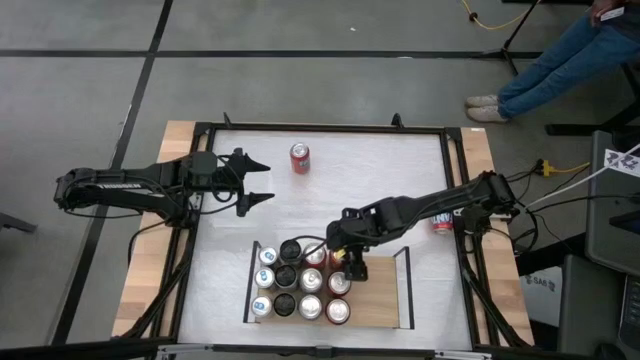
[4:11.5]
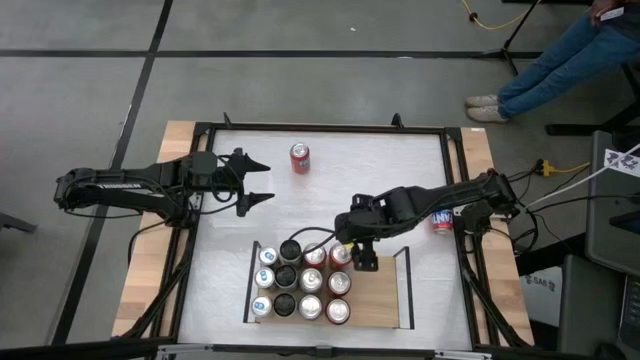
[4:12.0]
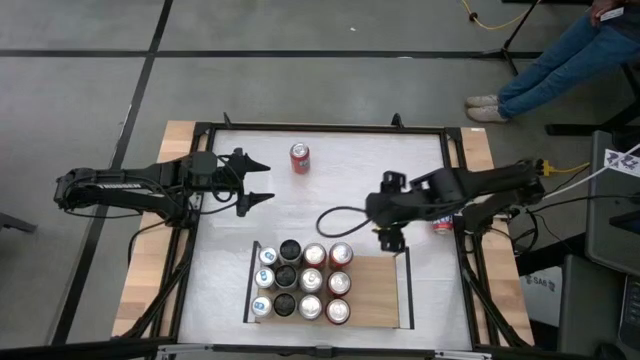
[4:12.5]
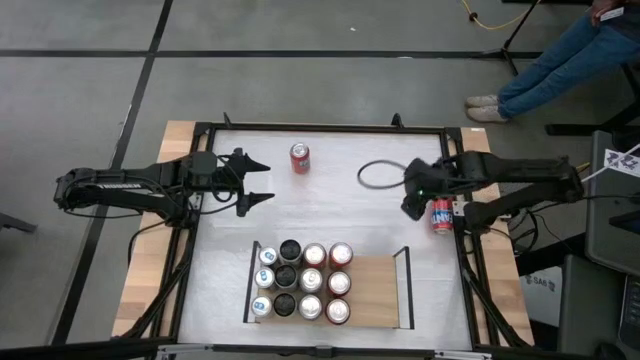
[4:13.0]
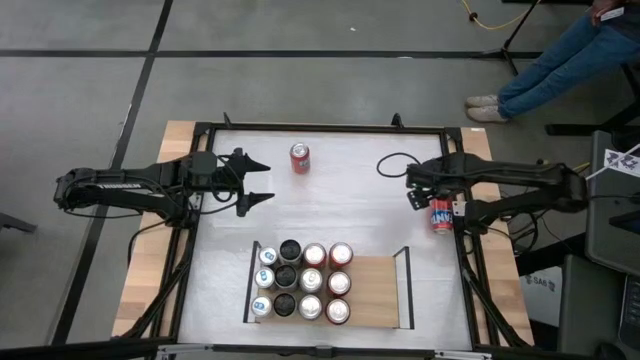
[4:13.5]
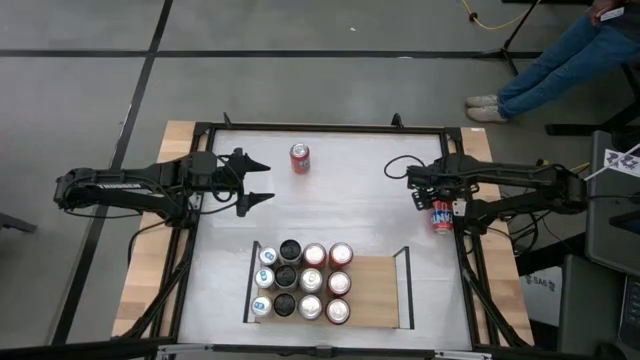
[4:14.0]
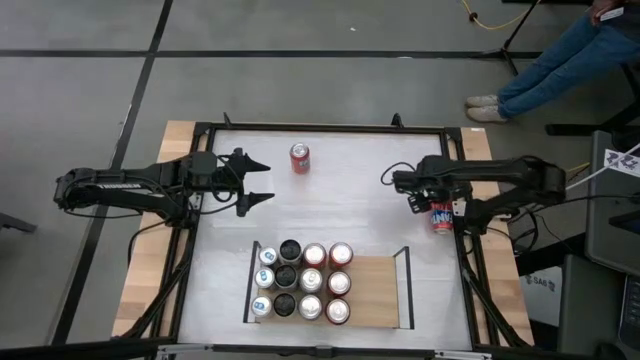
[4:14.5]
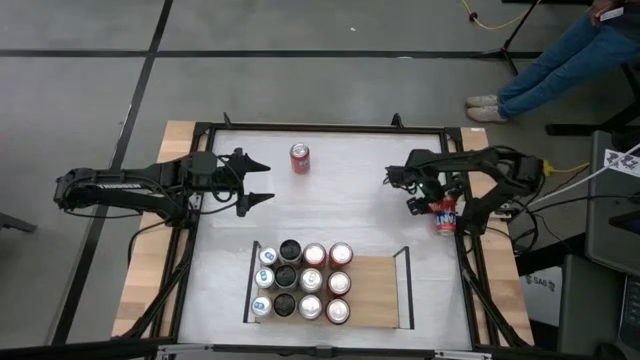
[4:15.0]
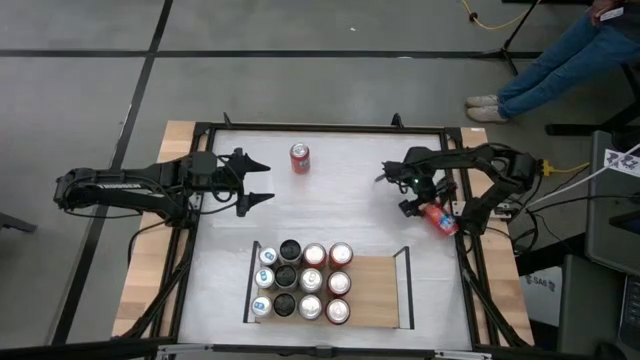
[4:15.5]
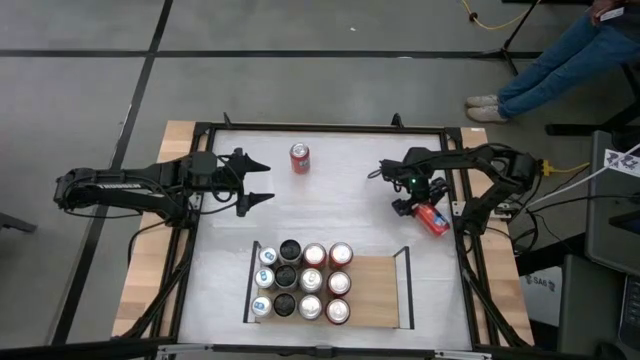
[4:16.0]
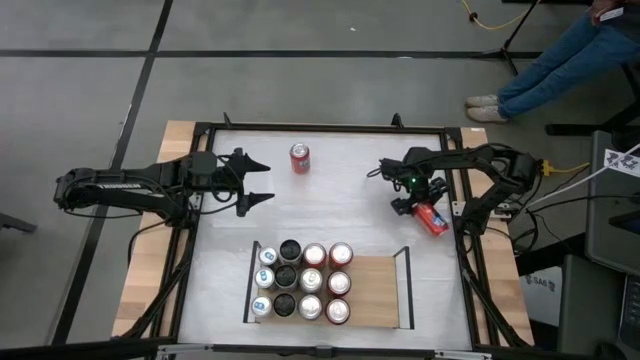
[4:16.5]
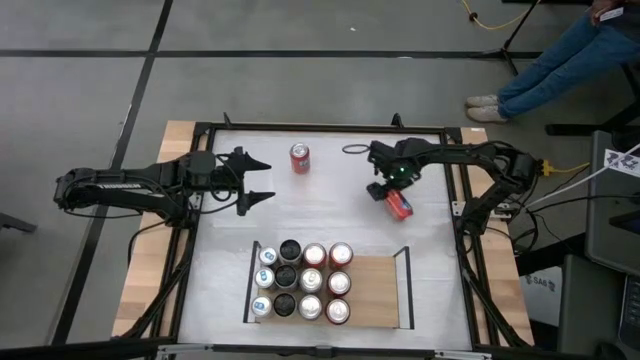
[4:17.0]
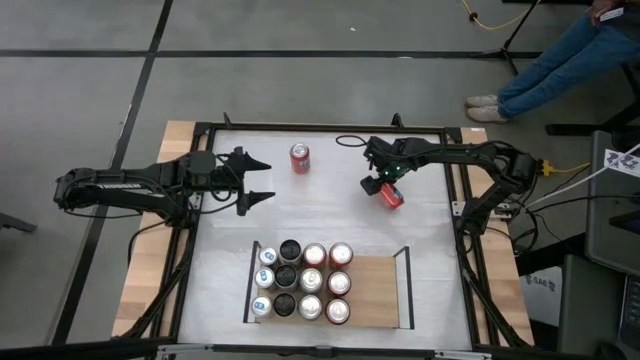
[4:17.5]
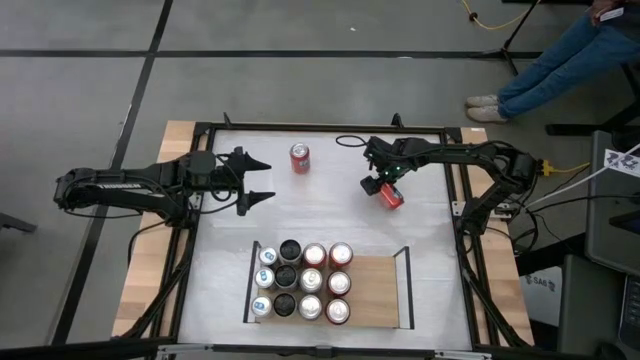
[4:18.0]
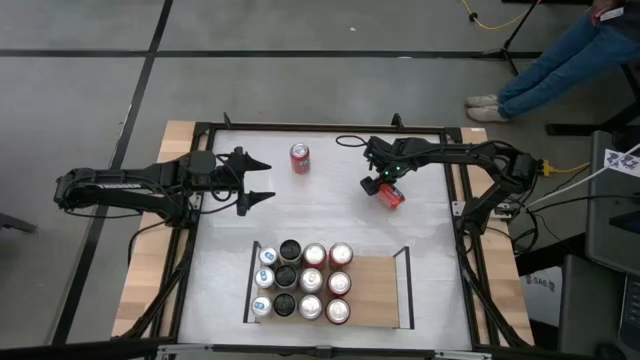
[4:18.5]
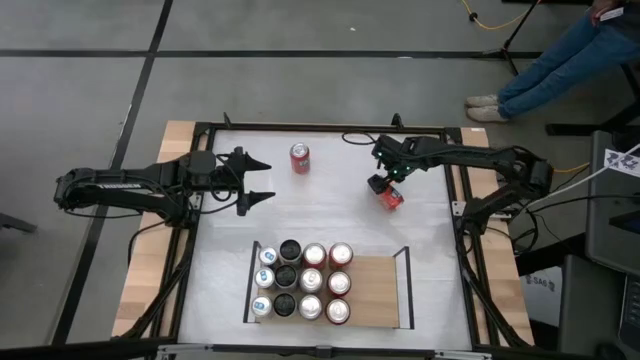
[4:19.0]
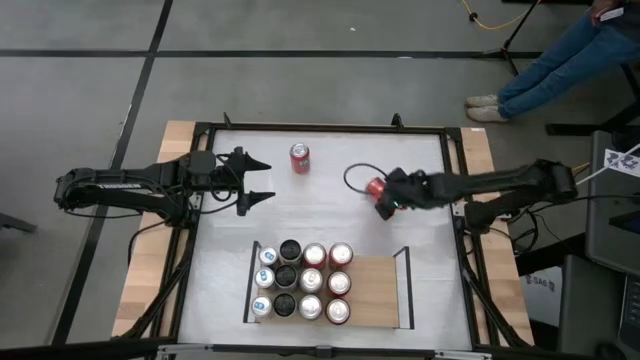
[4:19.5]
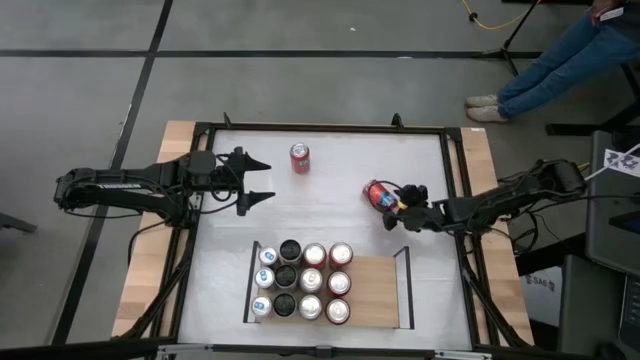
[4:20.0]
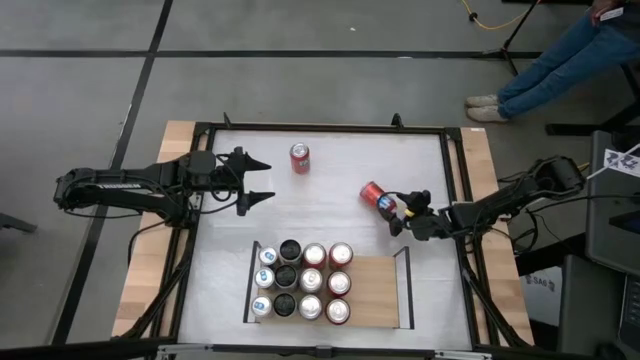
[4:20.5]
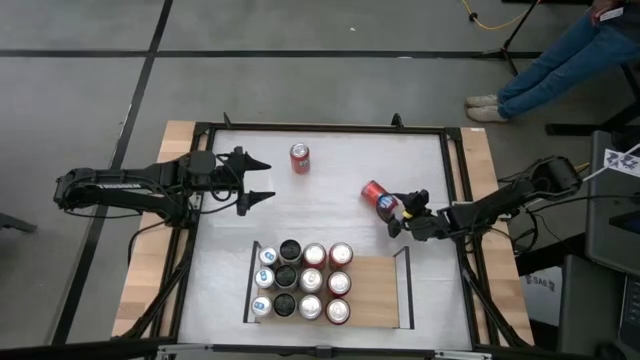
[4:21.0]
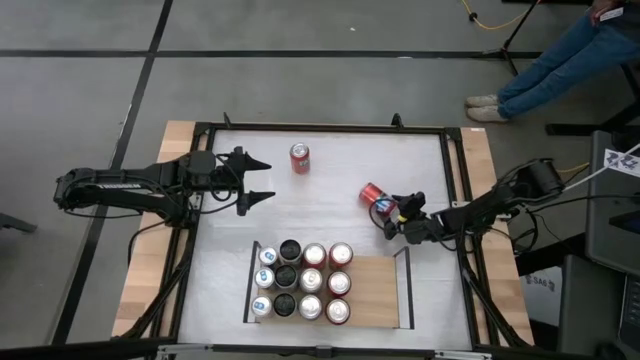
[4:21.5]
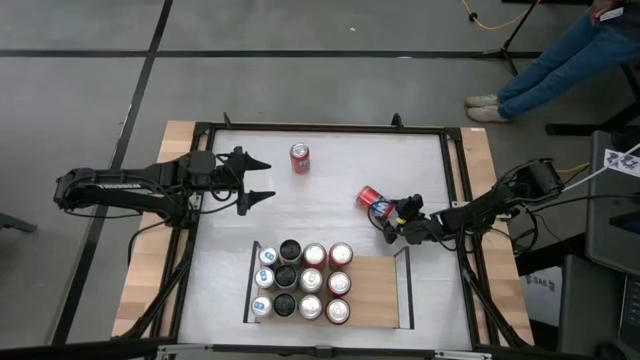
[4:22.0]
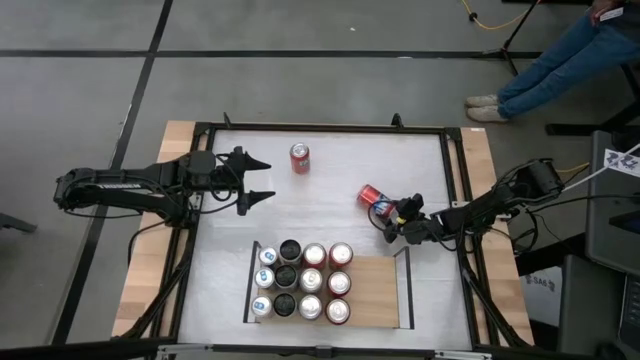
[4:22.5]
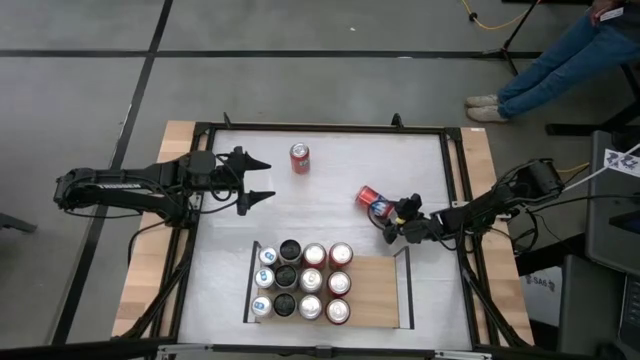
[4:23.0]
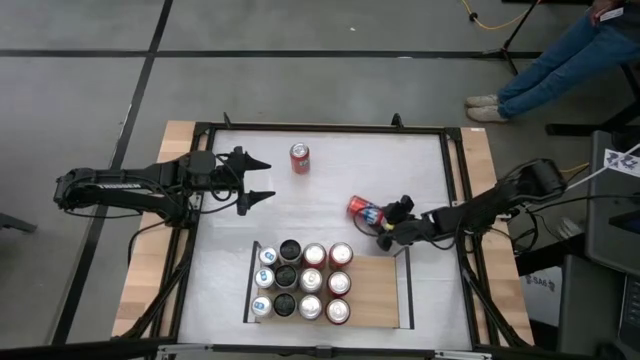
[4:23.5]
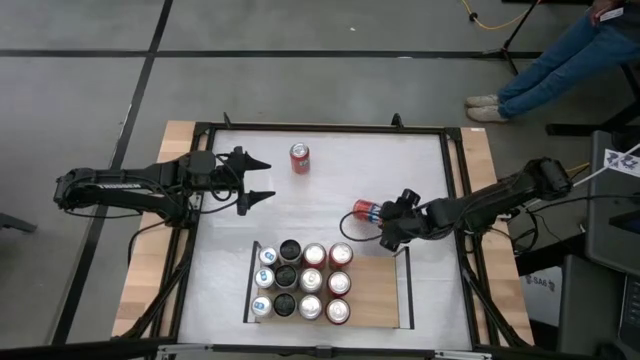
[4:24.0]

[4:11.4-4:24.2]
Task: Place canned beverage on shelf
Put the red soda can on the shelf

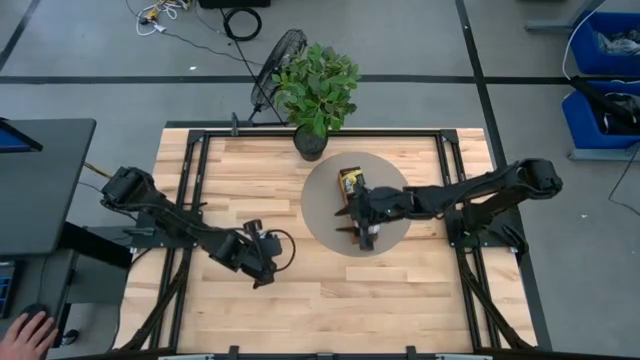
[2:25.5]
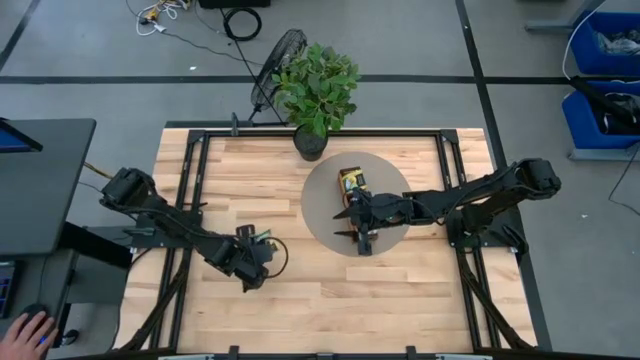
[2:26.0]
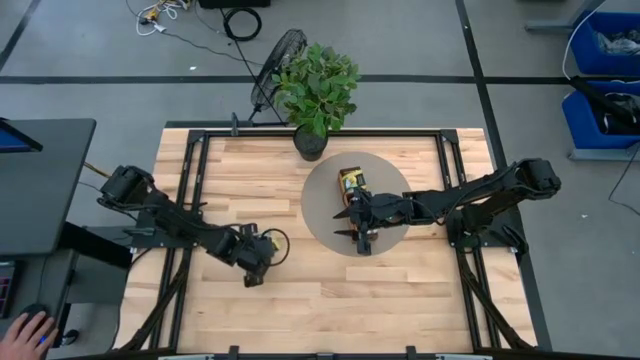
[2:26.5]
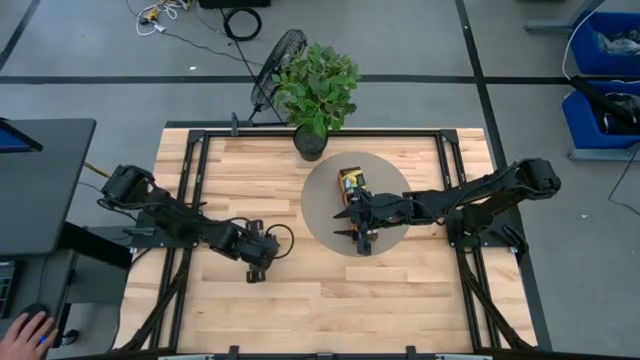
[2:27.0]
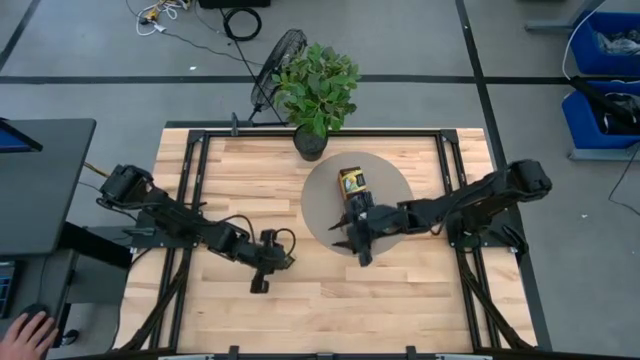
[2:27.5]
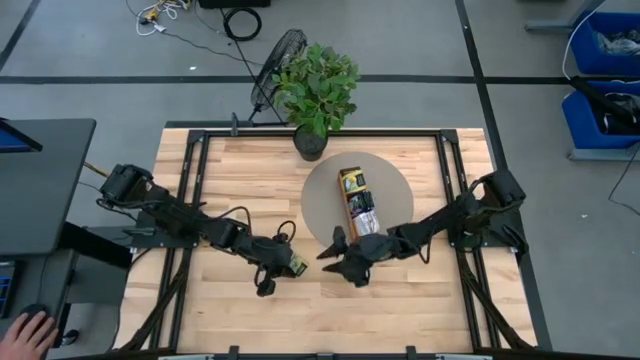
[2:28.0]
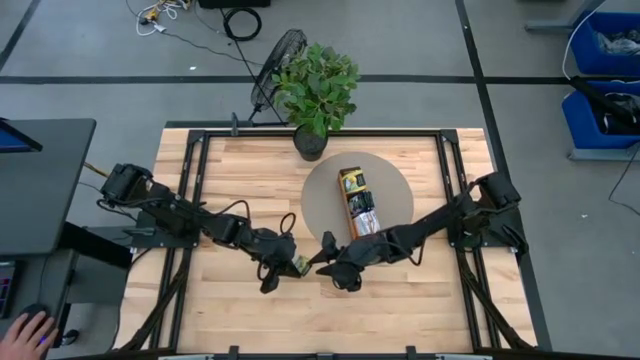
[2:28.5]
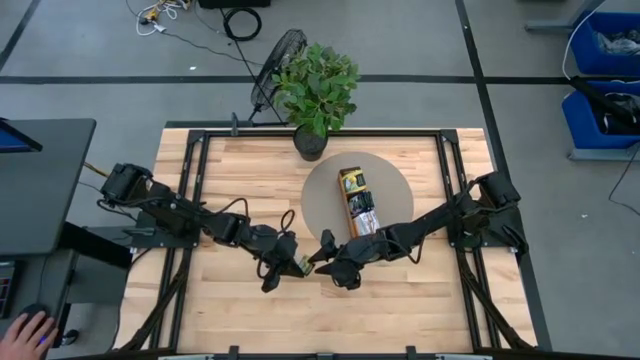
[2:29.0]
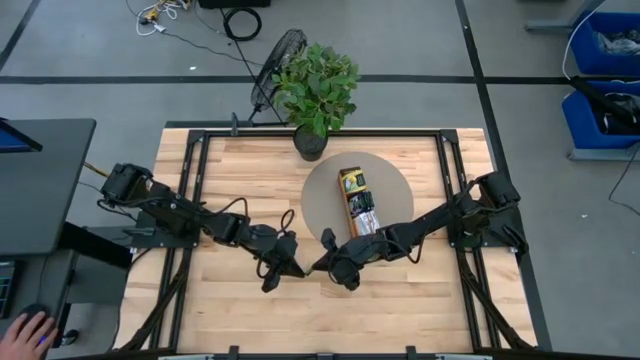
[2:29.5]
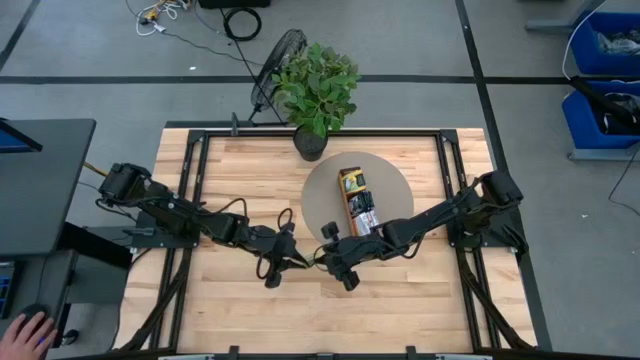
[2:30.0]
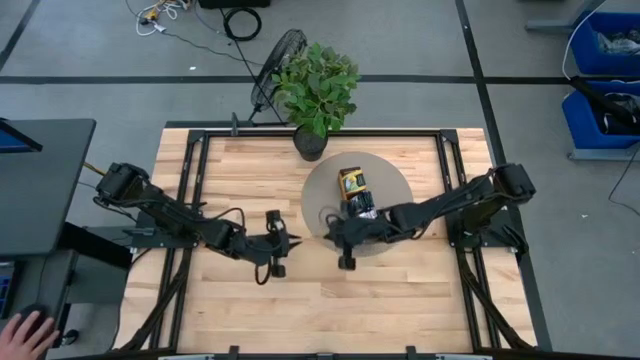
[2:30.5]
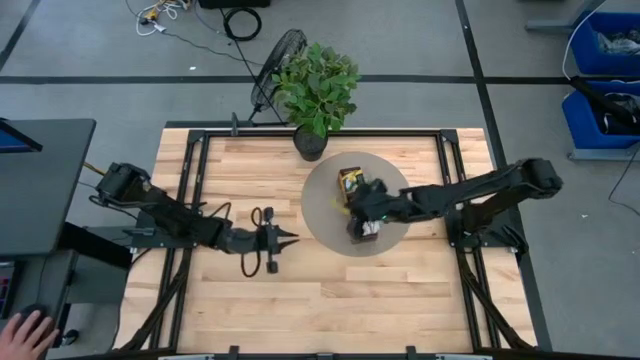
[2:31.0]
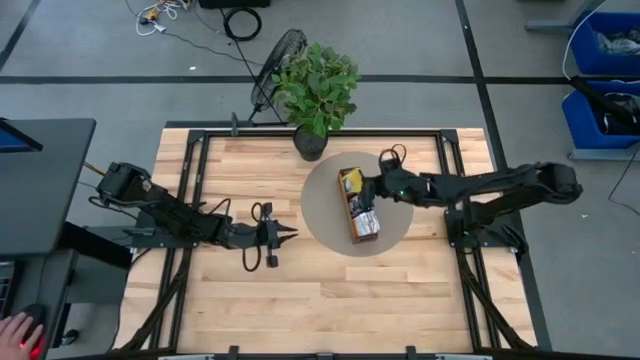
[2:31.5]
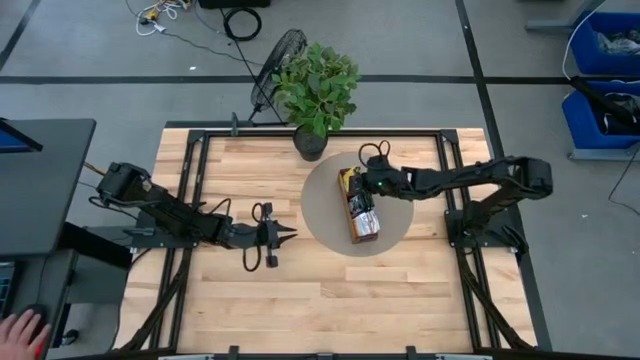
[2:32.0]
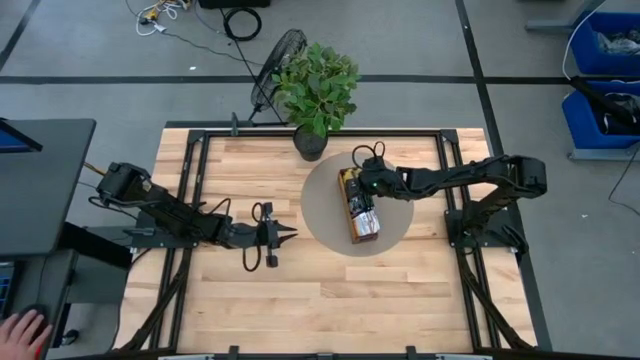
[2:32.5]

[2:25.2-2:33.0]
Task: Pick & Place Tea
Put the yellow tea bag into the top section of the wooden organizer
